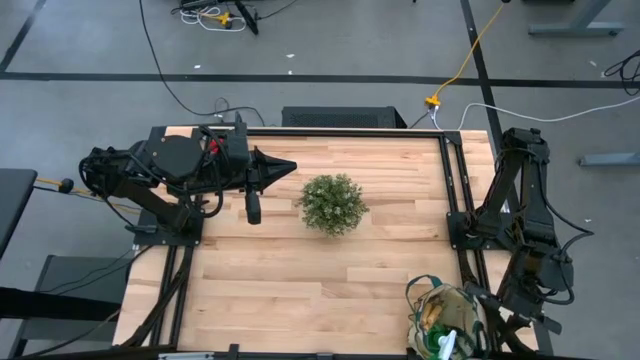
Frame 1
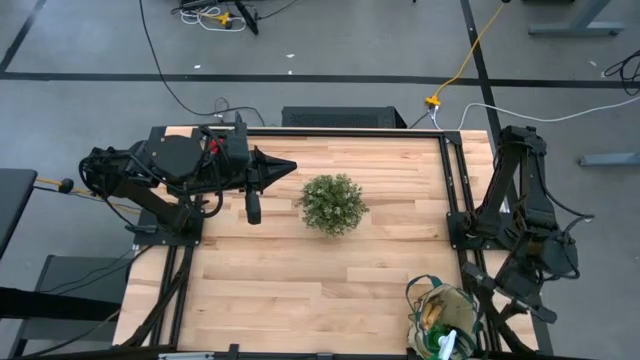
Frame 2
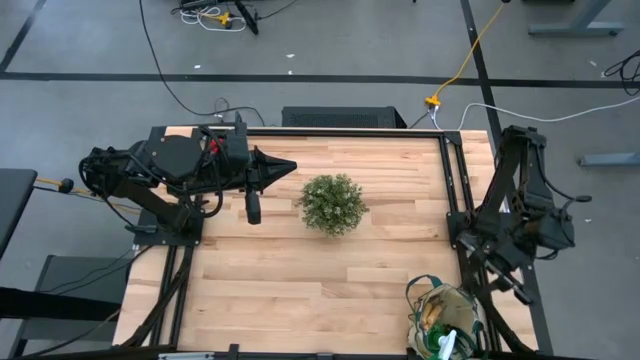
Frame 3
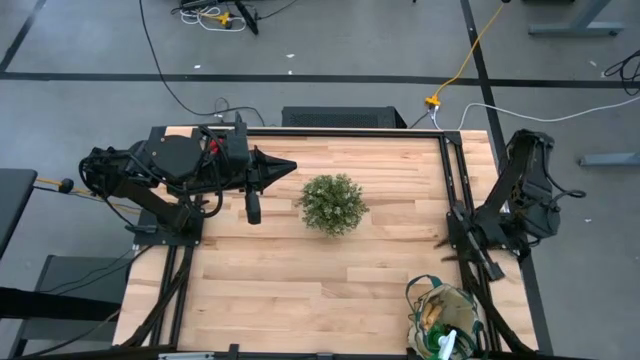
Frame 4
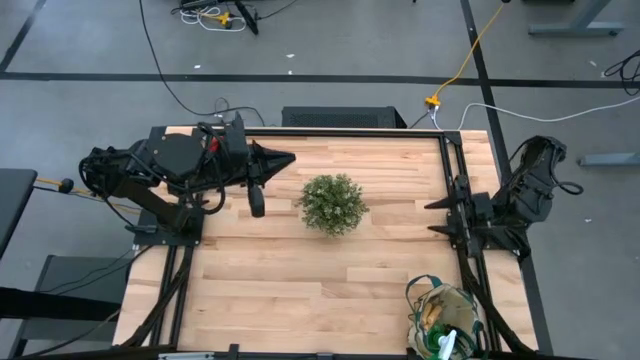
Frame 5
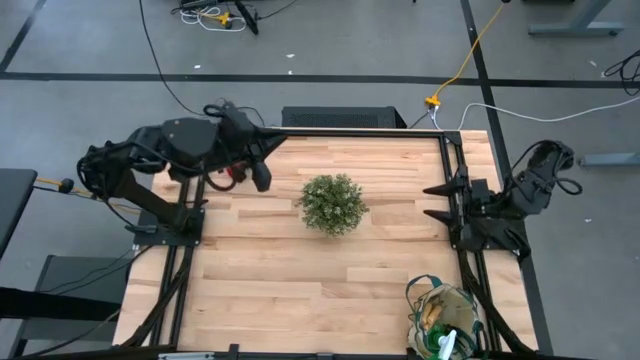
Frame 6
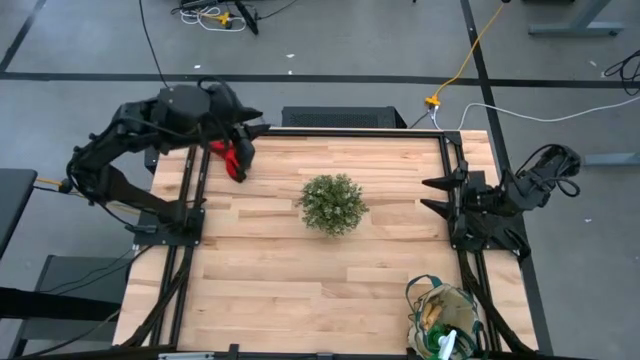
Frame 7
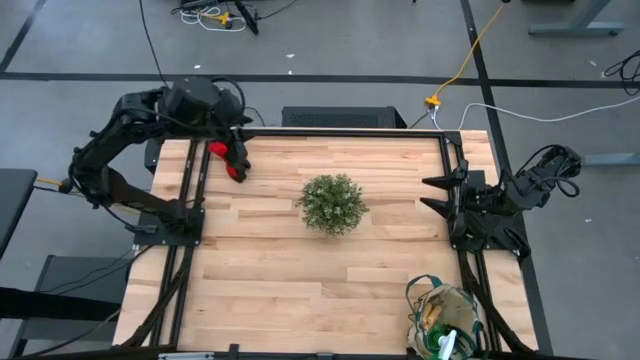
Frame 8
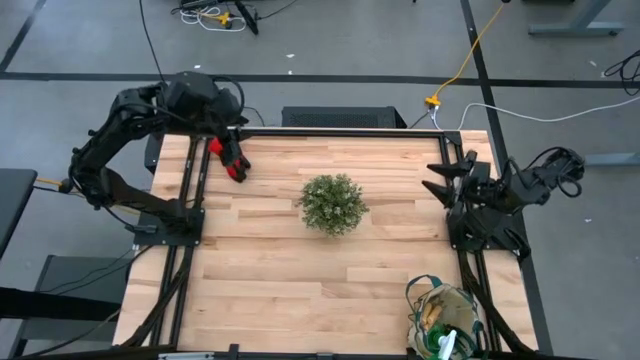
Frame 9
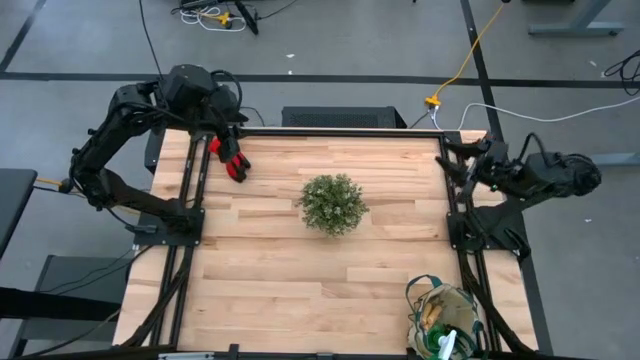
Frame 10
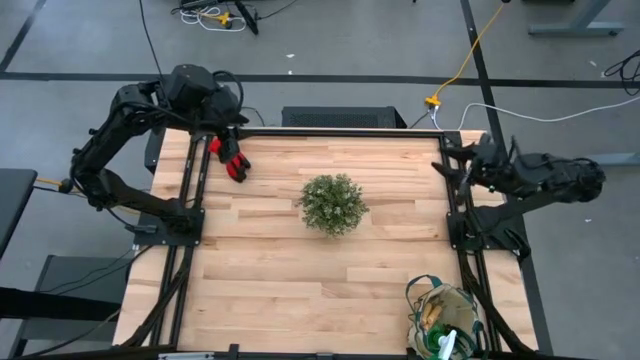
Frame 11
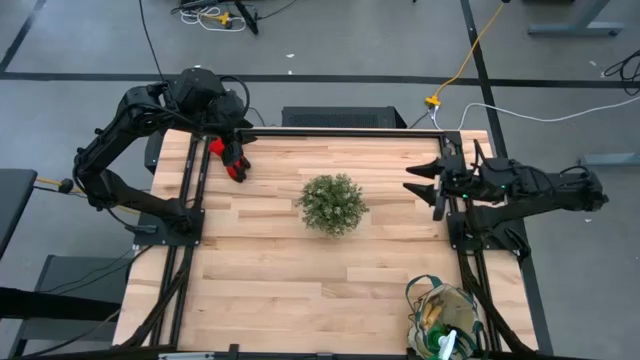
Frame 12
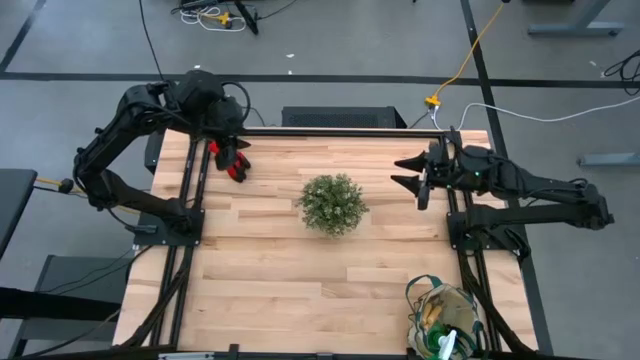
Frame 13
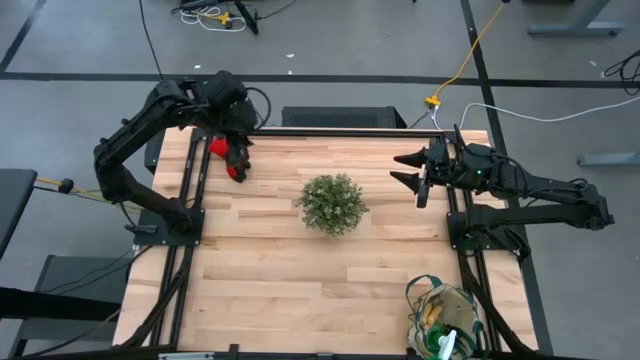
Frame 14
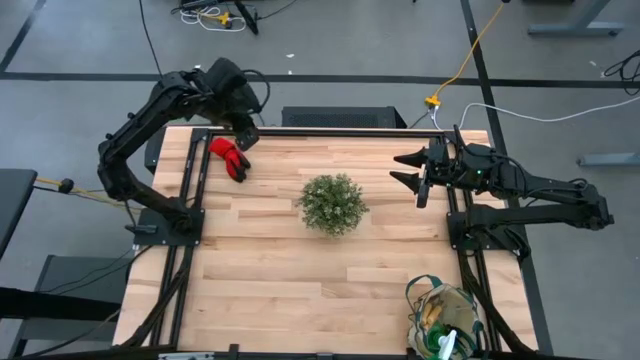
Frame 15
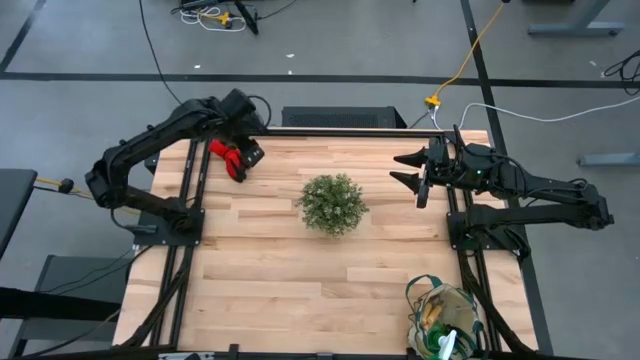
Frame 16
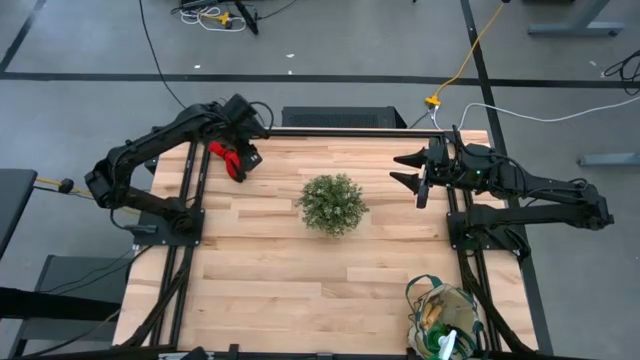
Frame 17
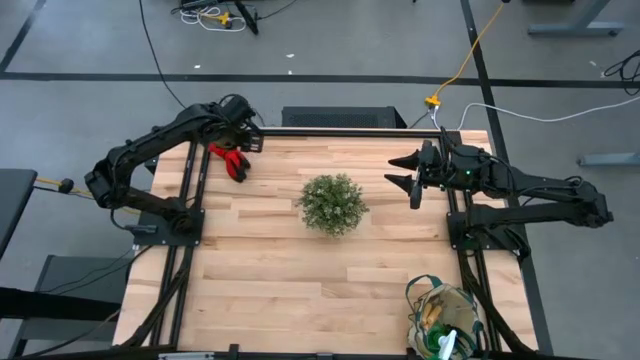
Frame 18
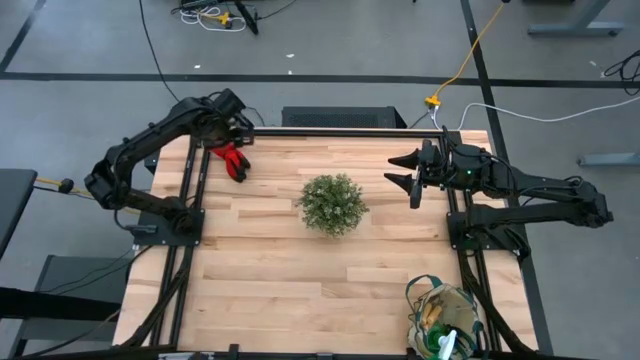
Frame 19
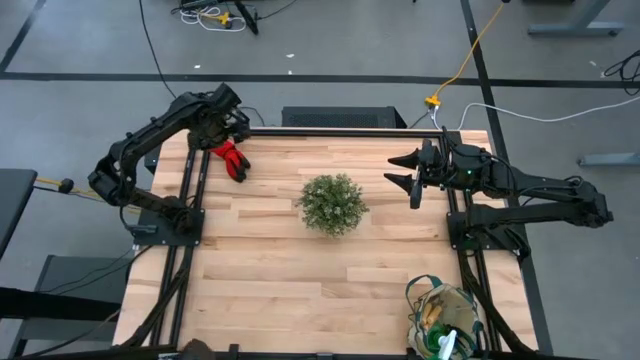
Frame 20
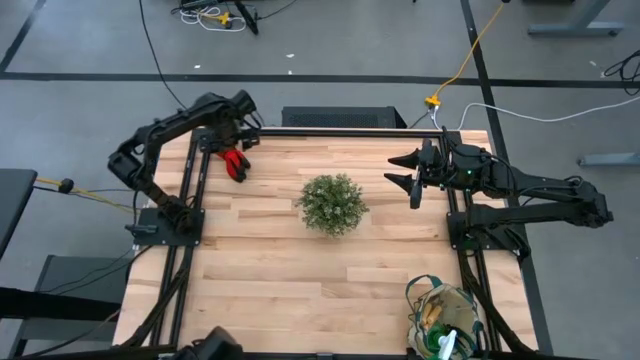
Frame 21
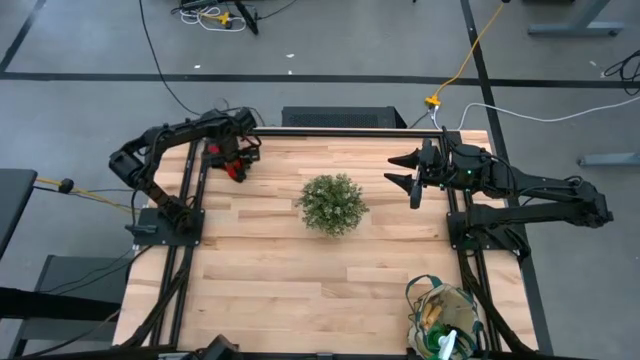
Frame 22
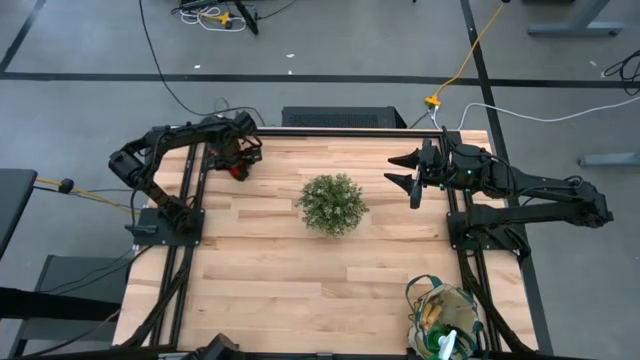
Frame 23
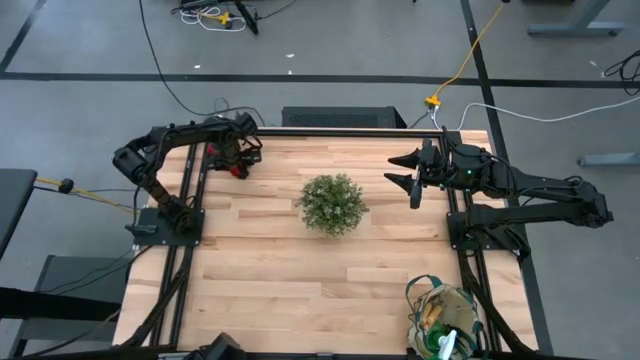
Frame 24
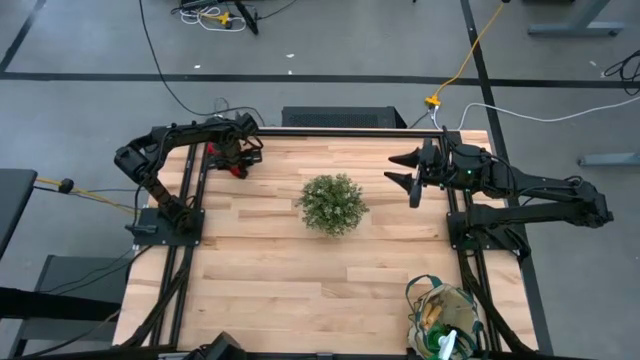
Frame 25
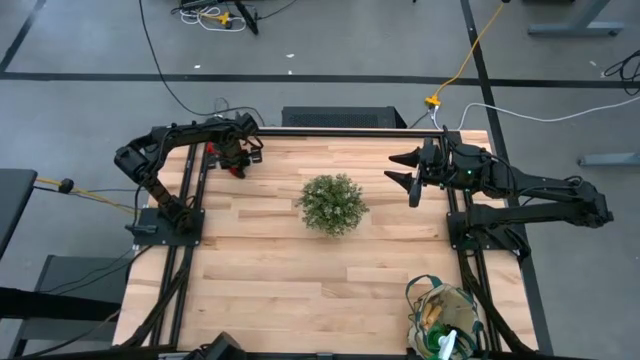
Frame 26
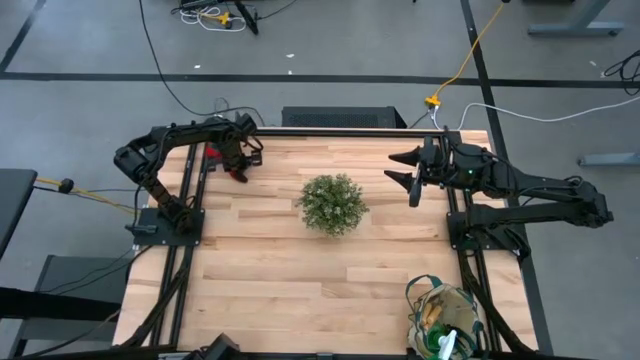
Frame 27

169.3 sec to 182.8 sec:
Task: Pick & Place Garden tools in Gardening bag
Put the red gloves into the white gardening bag

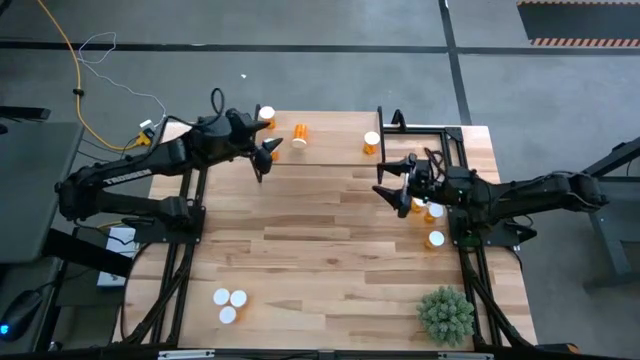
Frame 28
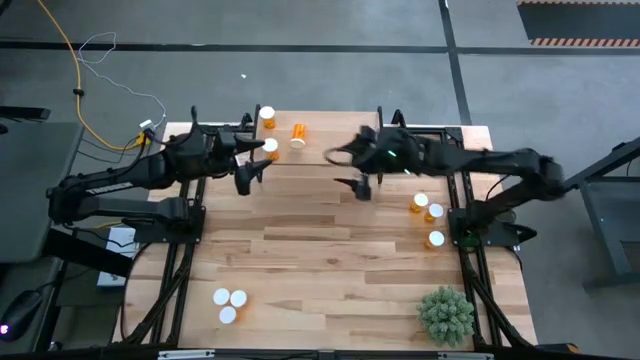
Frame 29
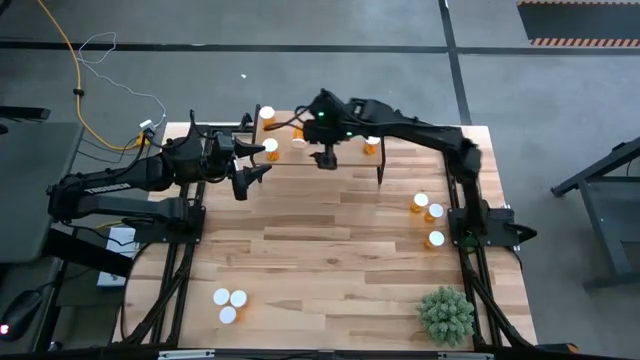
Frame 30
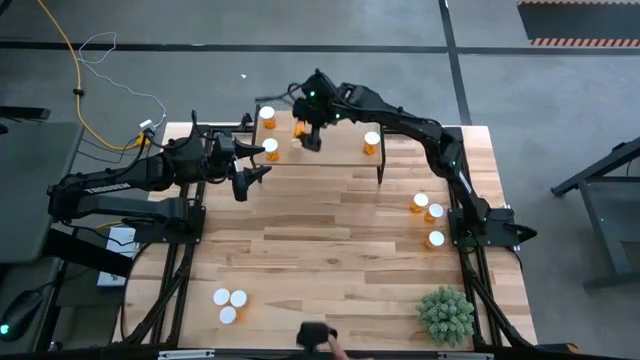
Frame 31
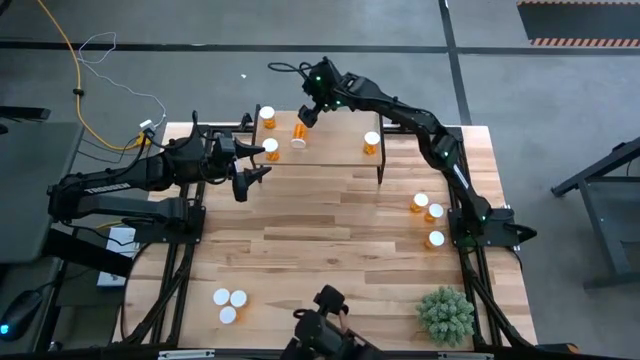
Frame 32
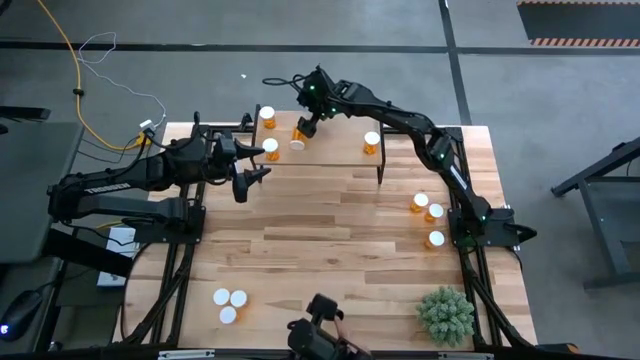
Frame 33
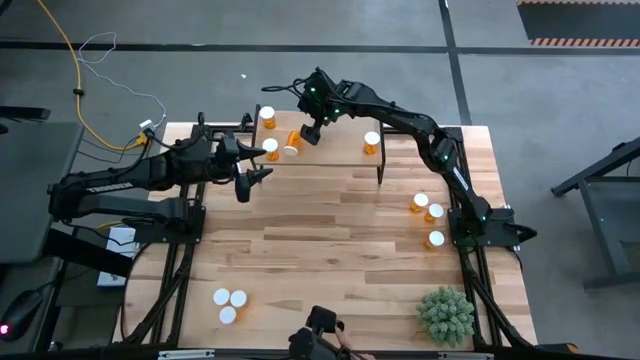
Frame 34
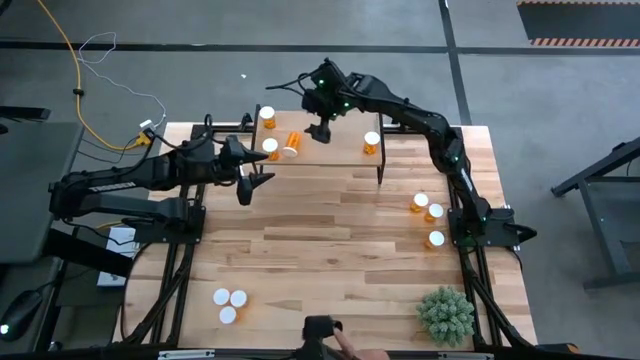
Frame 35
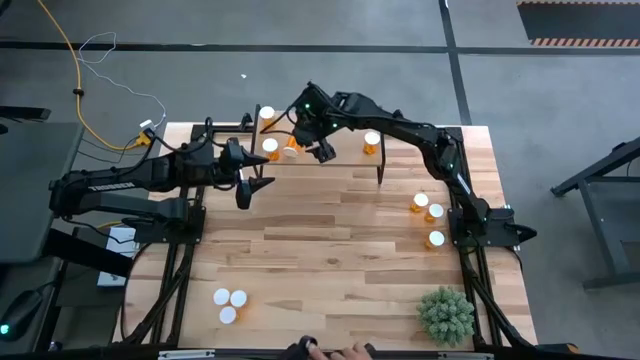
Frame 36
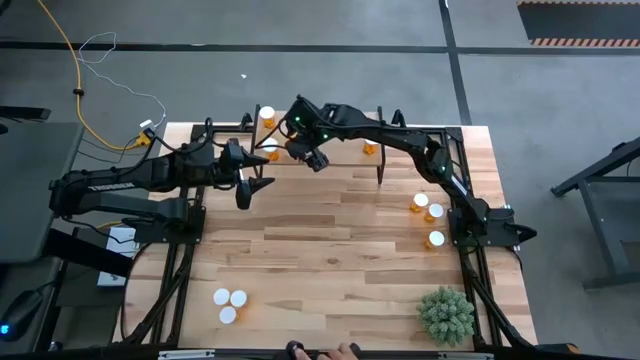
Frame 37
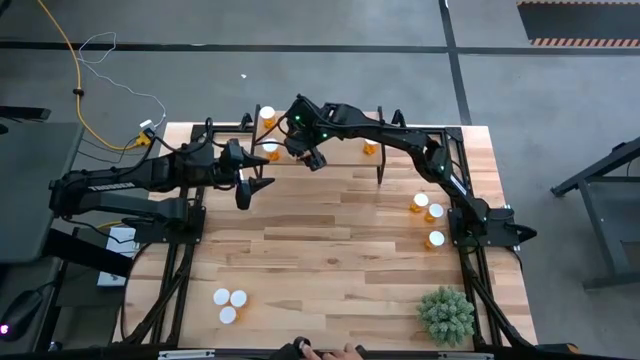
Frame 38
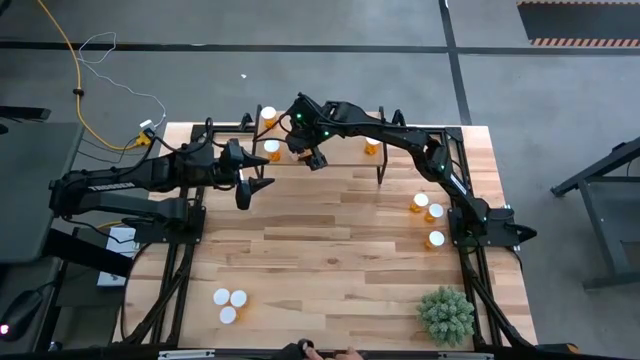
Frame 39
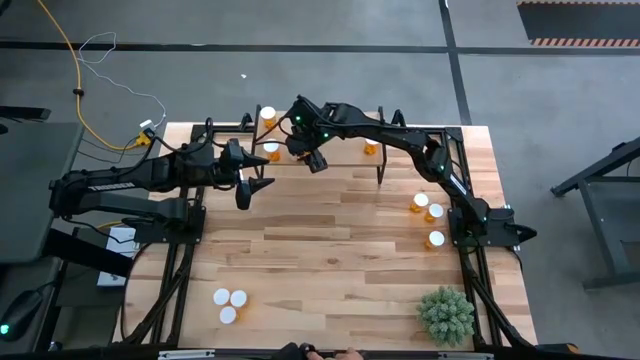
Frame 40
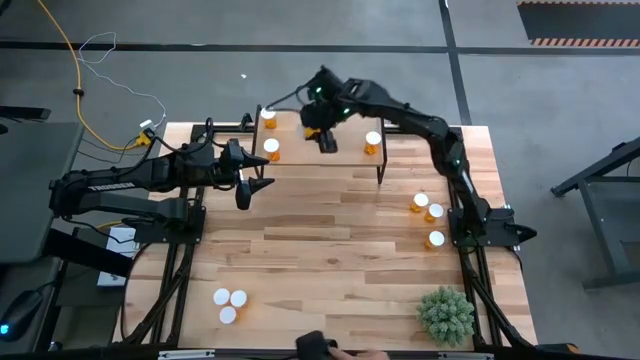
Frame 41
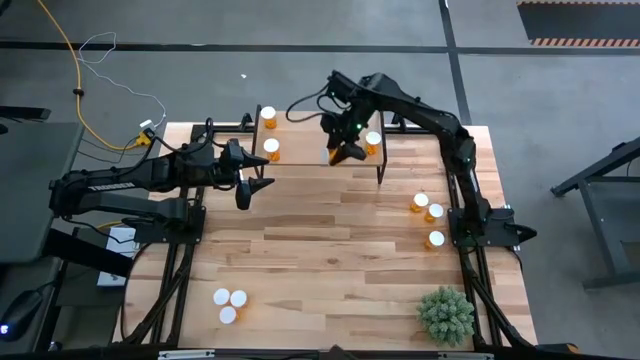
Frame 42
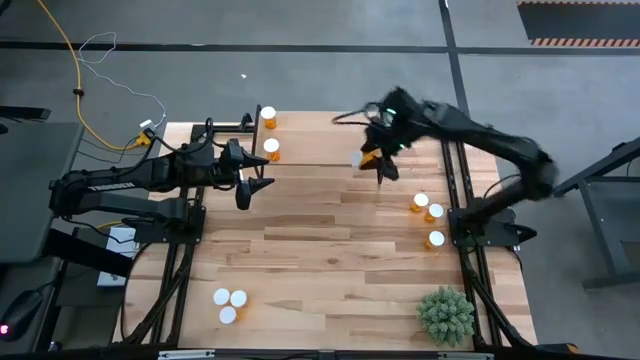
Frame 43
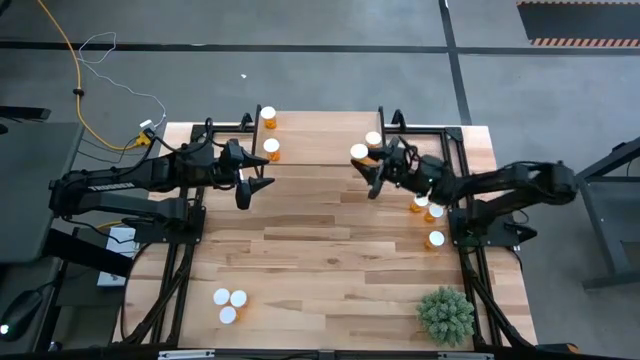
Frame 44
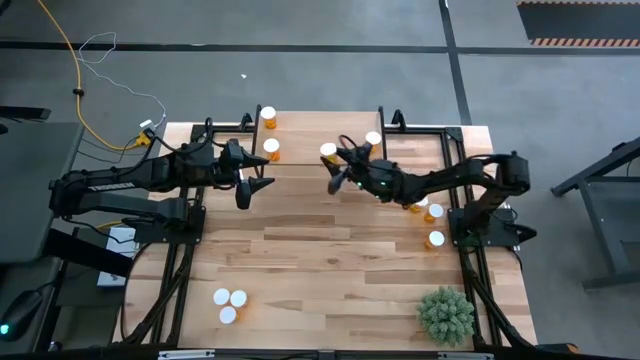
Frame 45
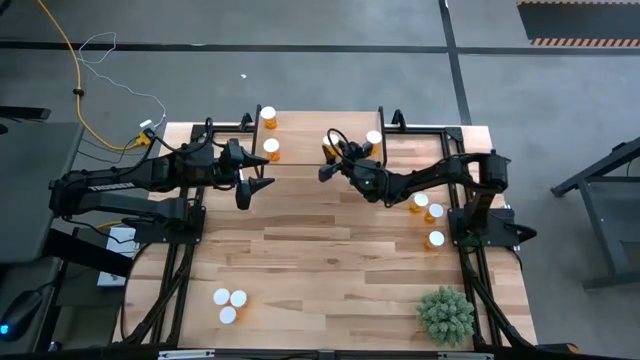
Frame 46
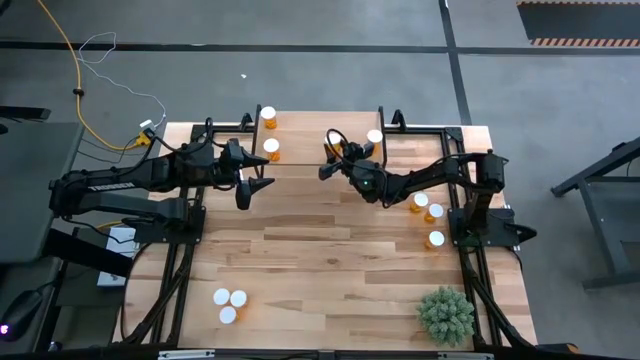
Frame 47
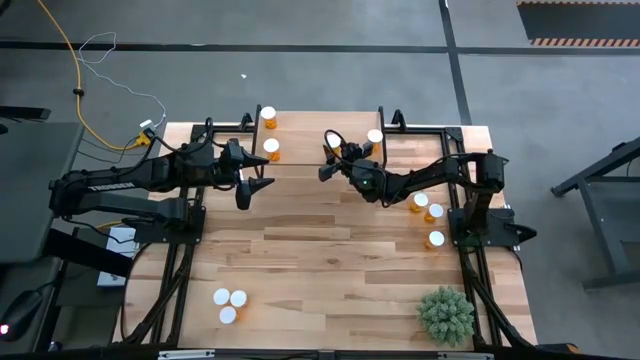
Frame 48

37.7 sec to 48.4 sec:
Task: Pick and place medicine bottles onto shelf by color
Adjust the orange pill bottle on the shelf
